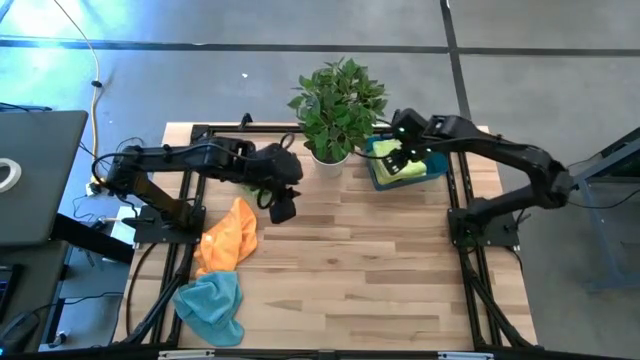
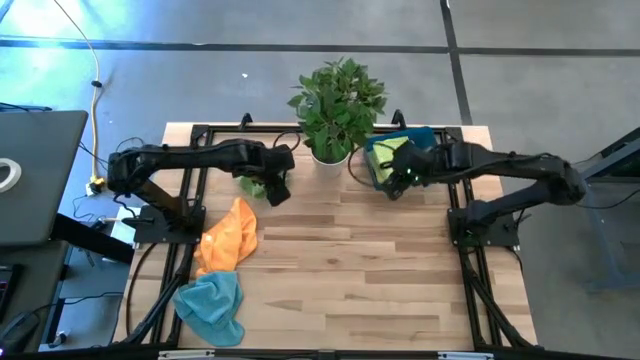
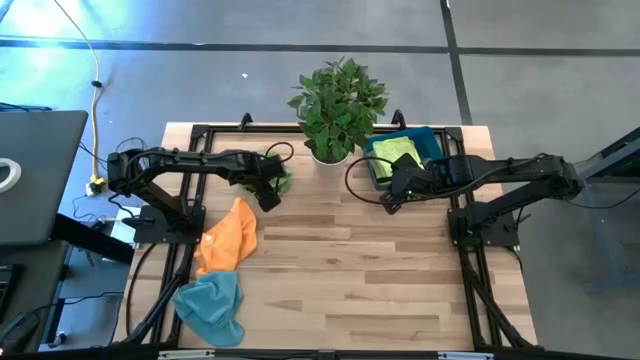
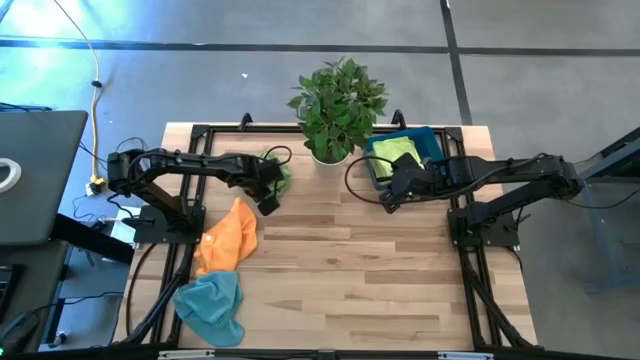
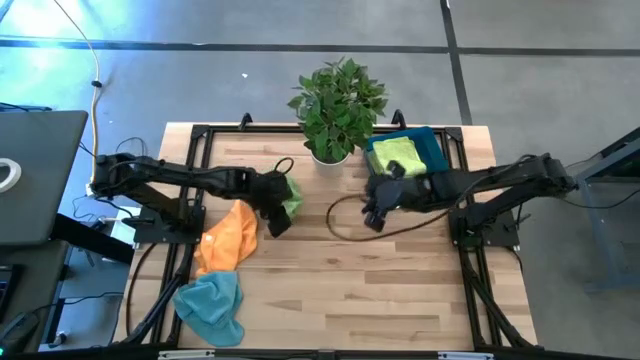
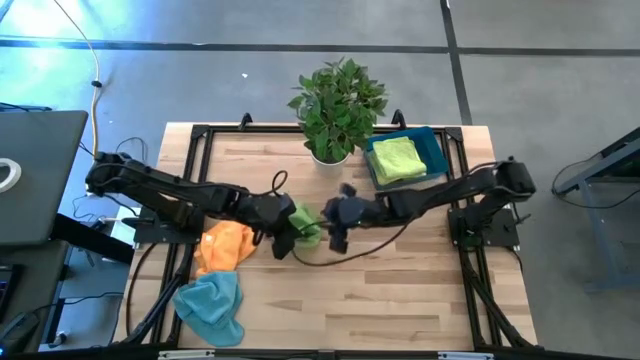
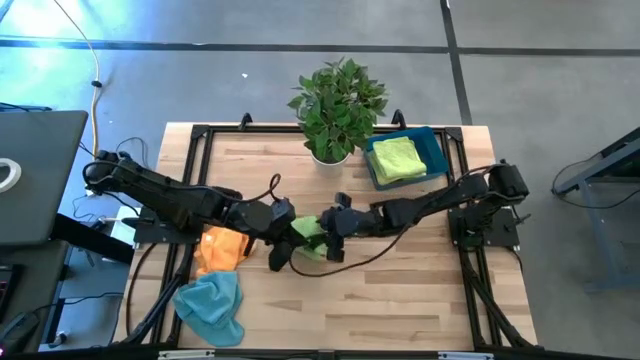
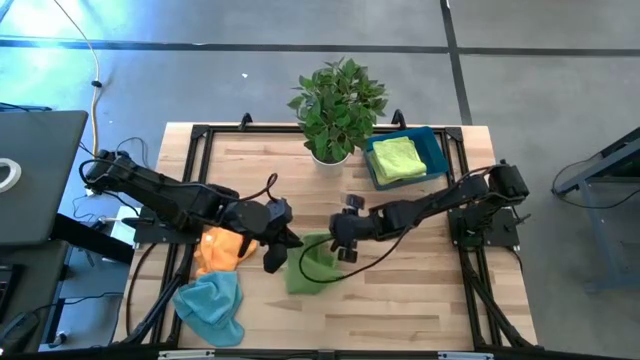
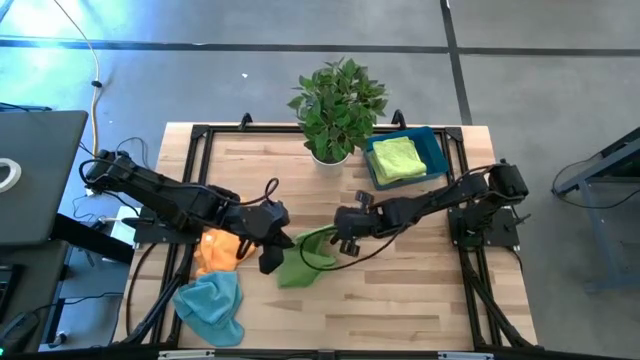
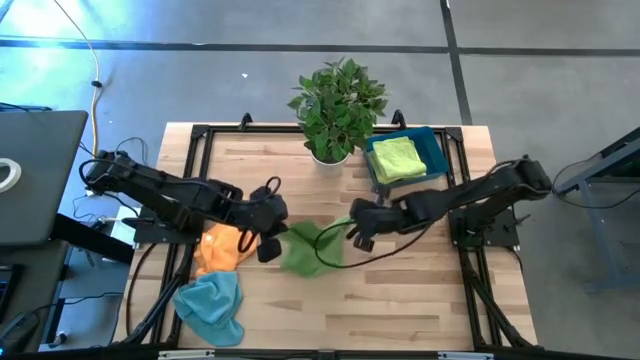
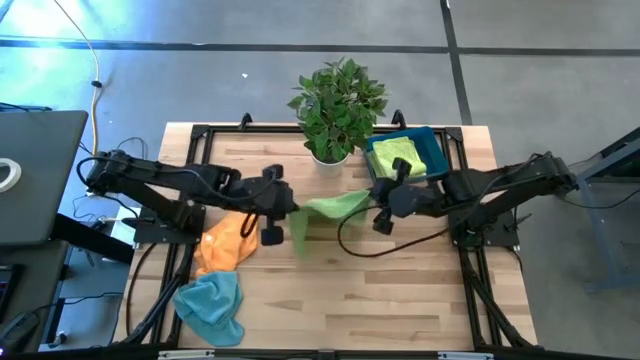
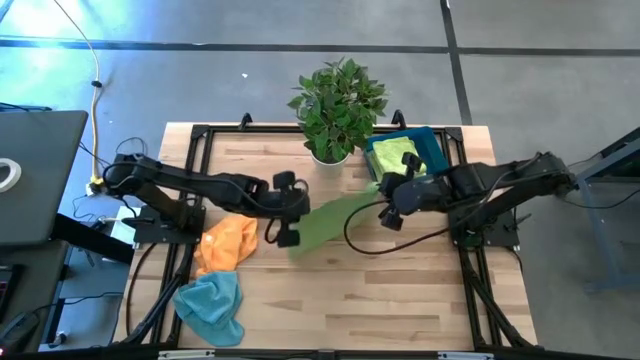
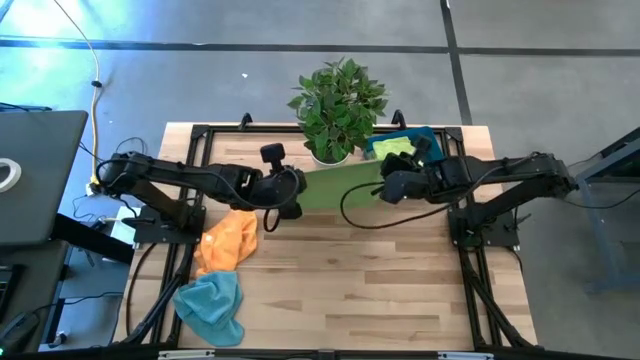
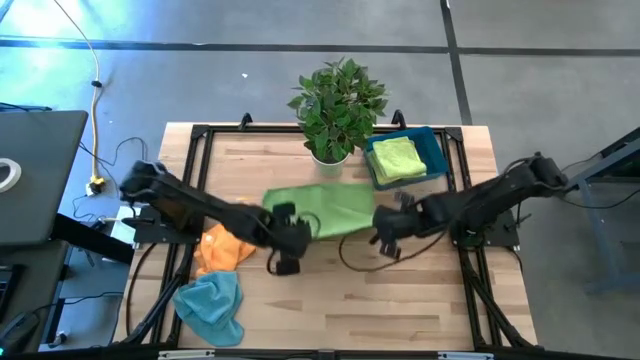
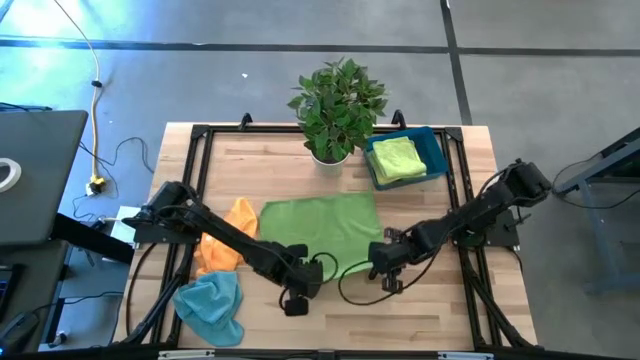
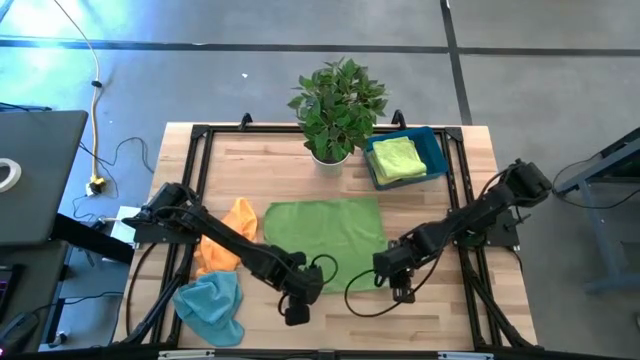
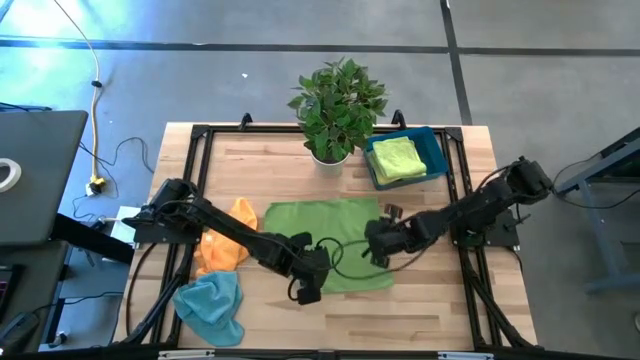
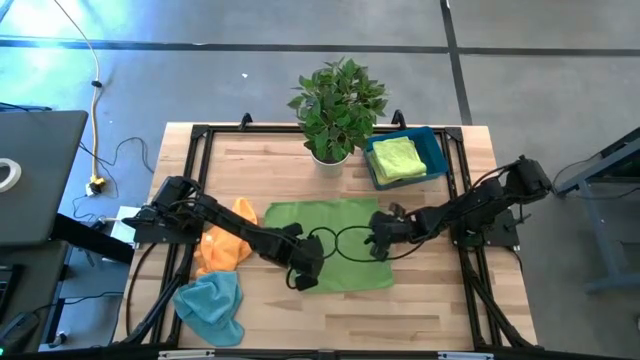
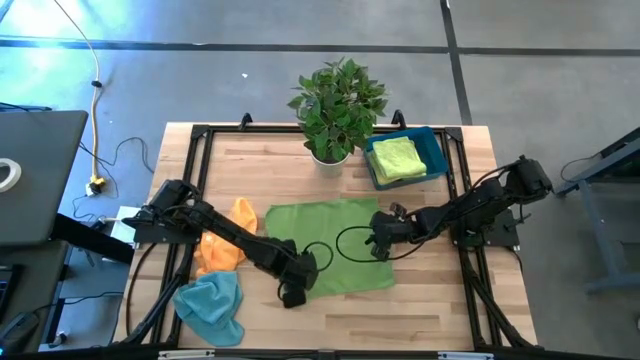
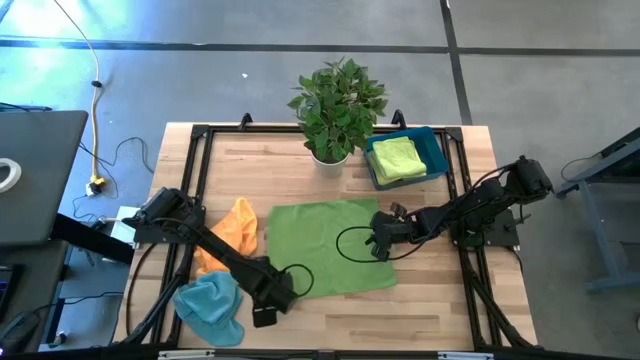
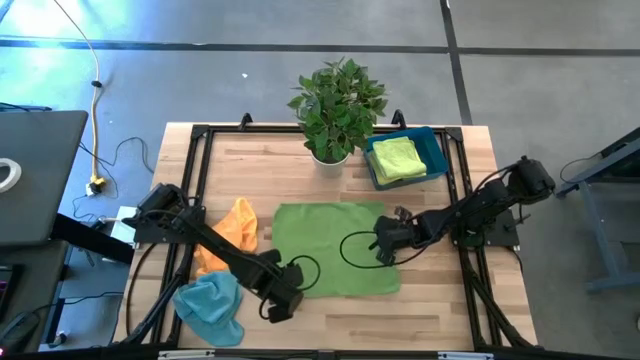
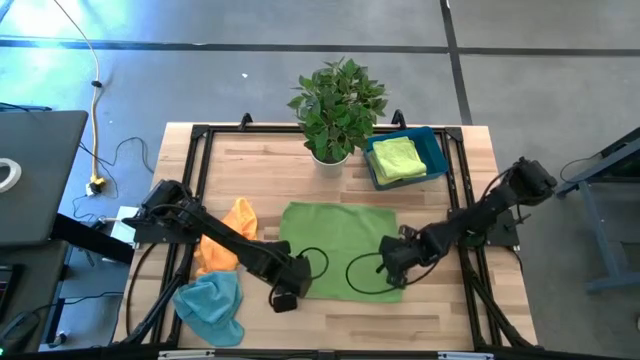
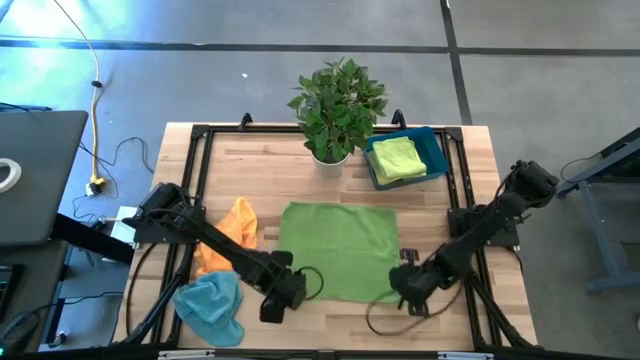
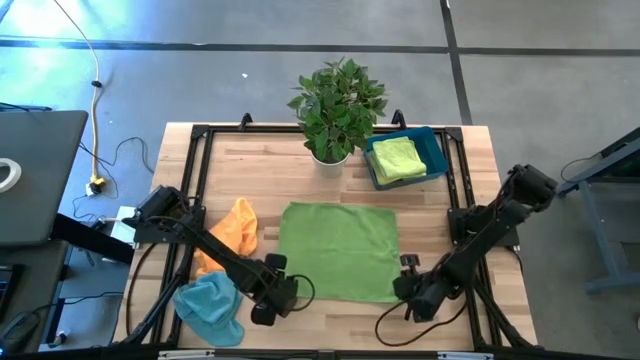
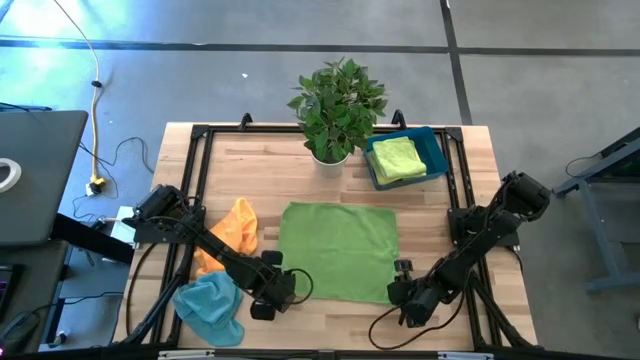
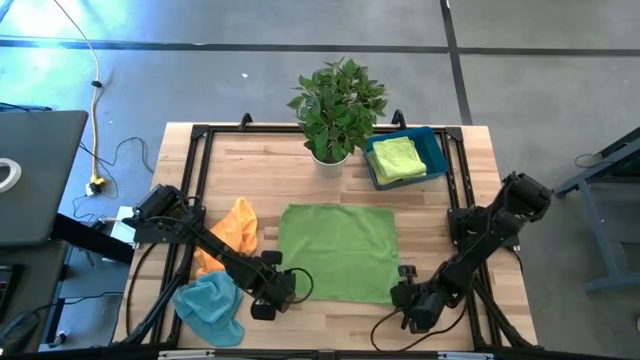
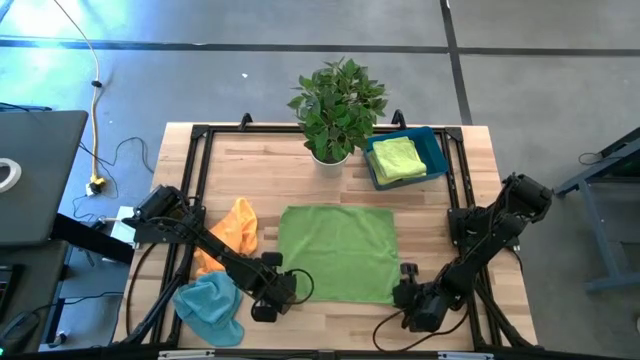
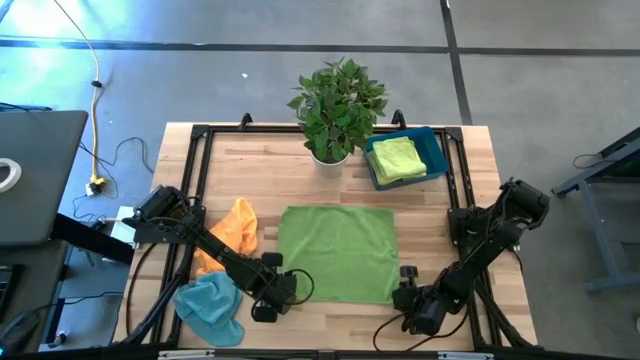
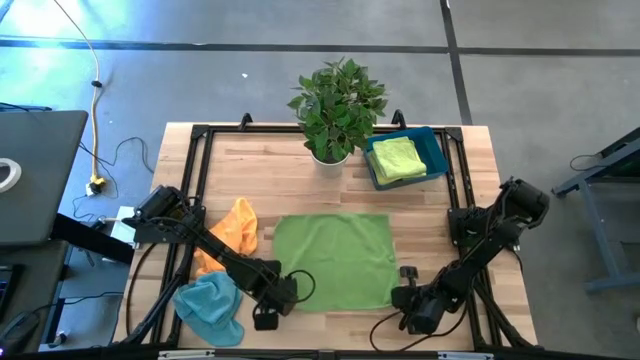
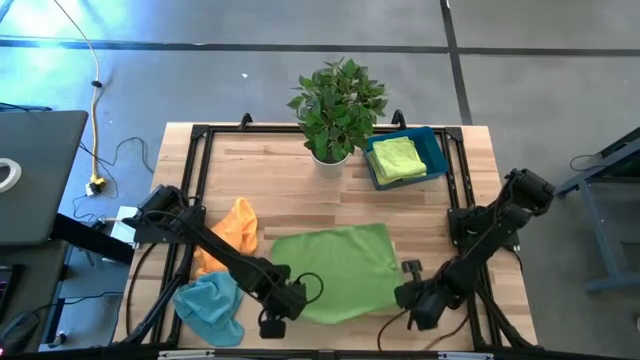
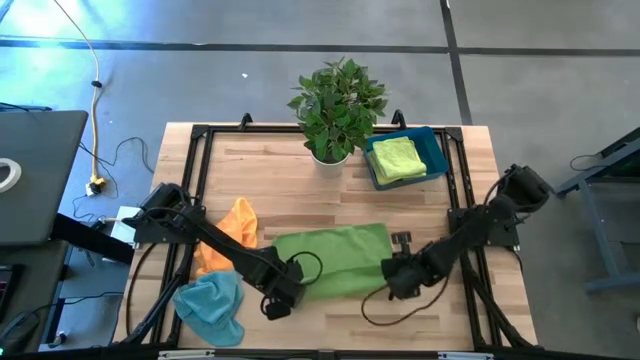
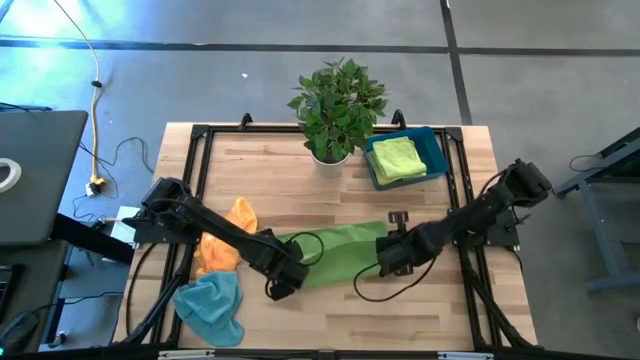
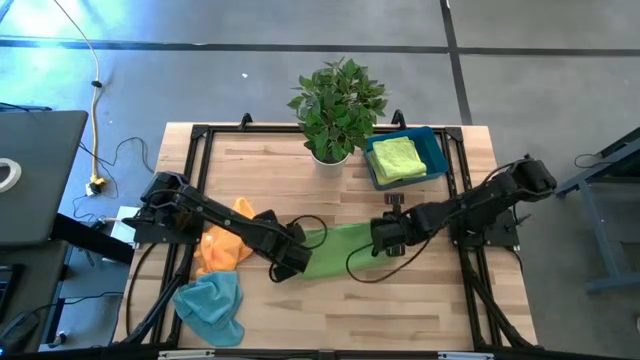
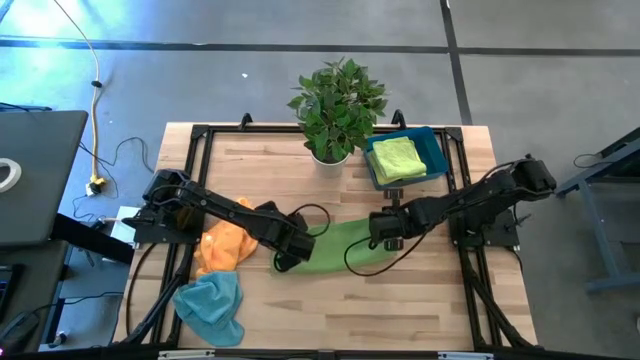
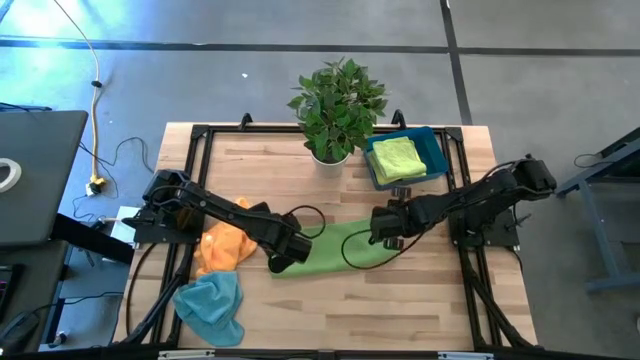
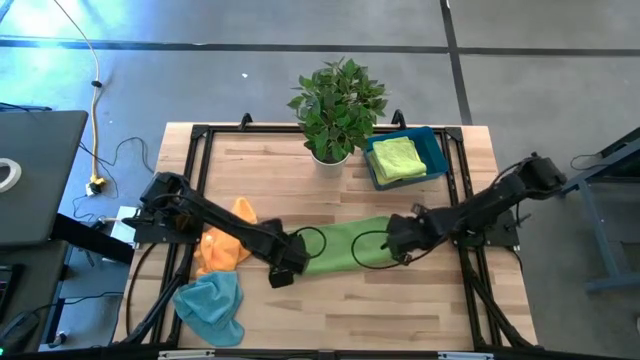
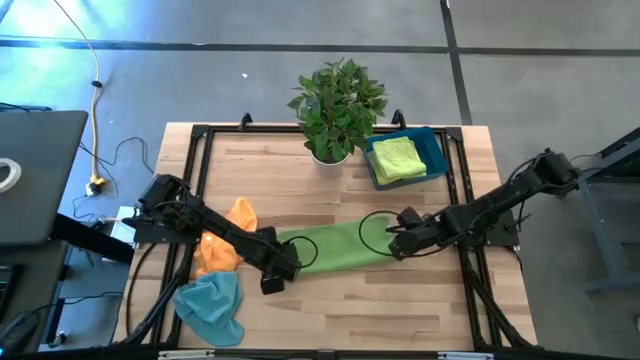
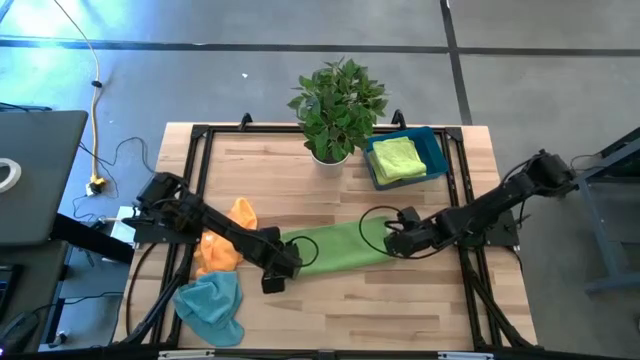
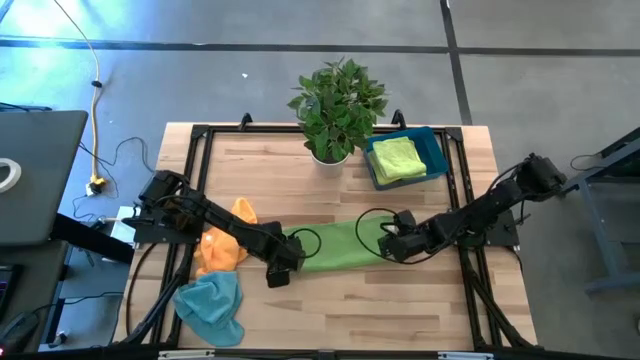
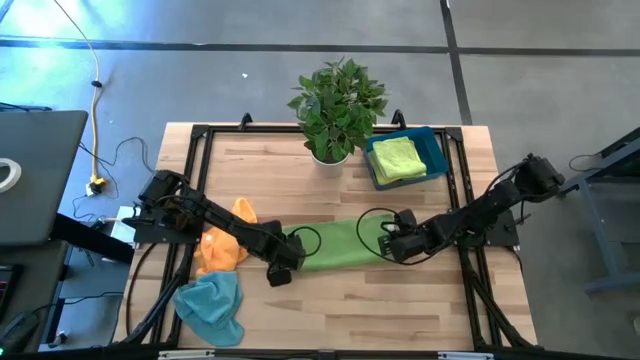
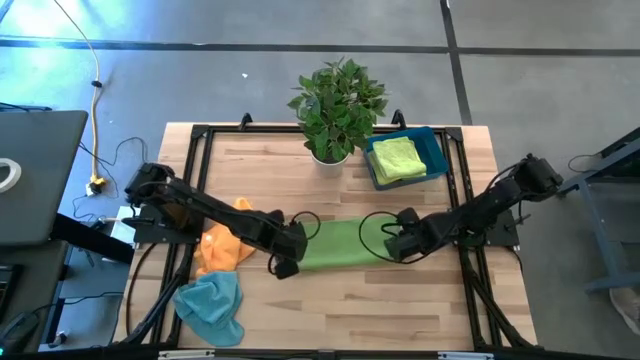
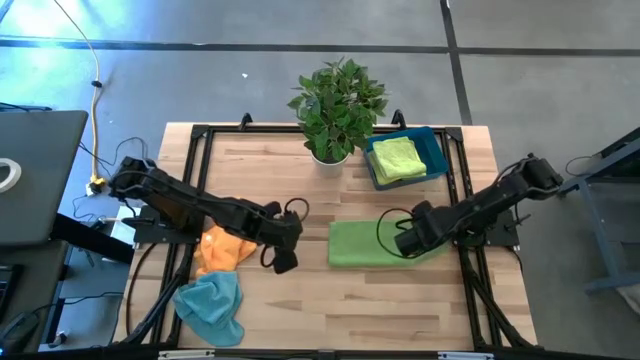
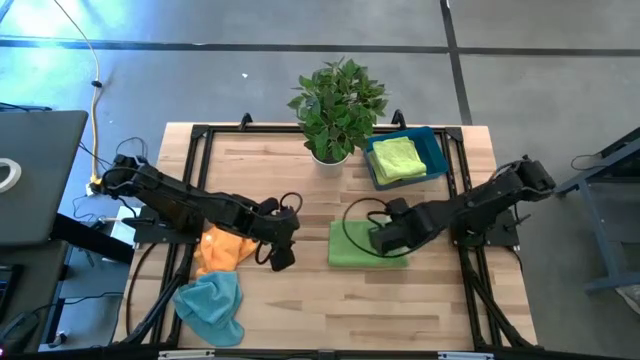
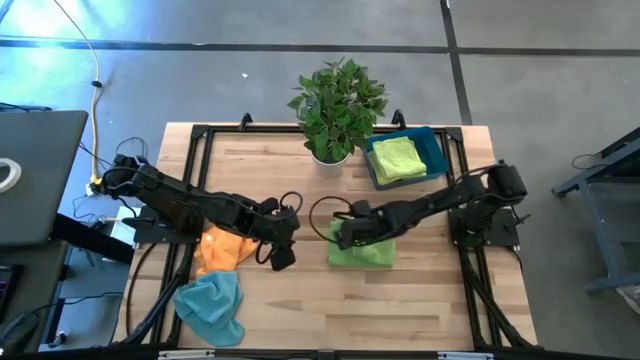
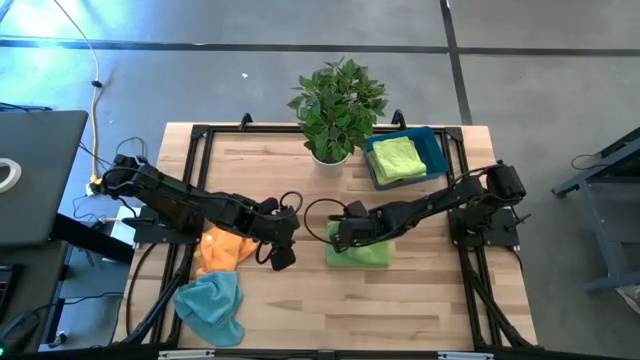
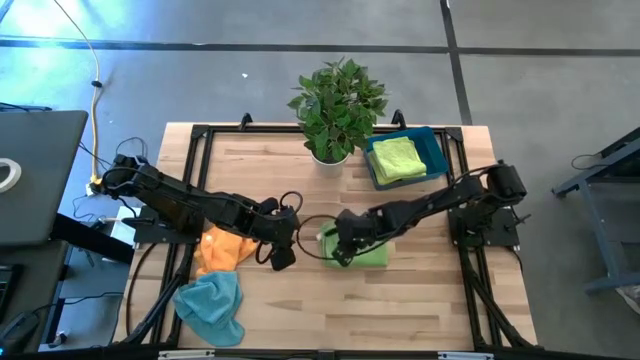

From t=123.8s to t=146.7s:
Task: Sort microfiber towel by color & place in baskets
Fold the green towel
